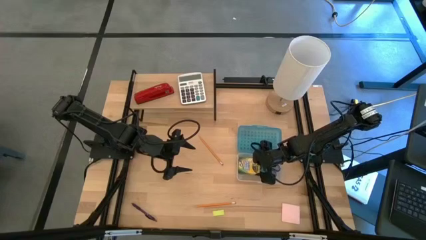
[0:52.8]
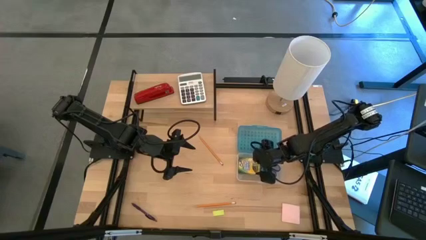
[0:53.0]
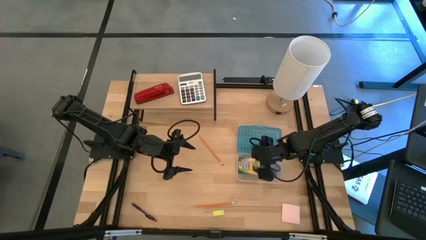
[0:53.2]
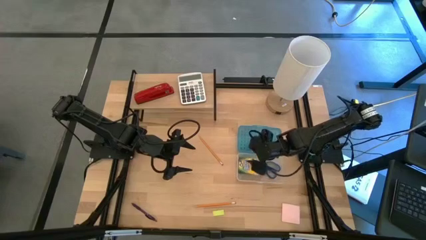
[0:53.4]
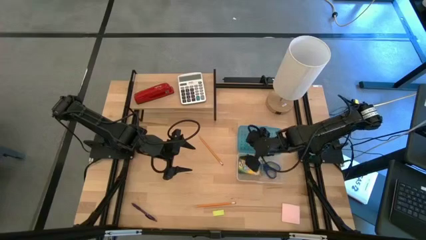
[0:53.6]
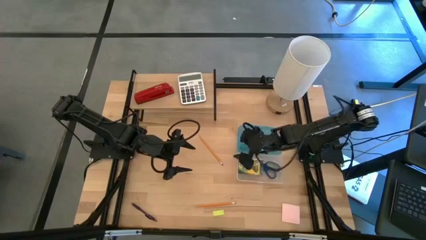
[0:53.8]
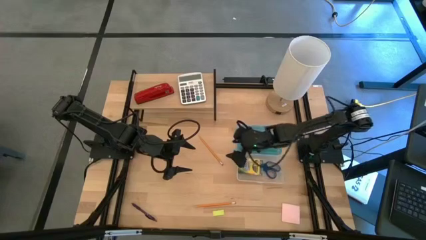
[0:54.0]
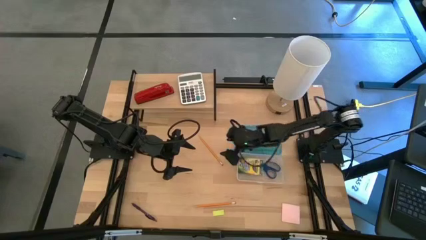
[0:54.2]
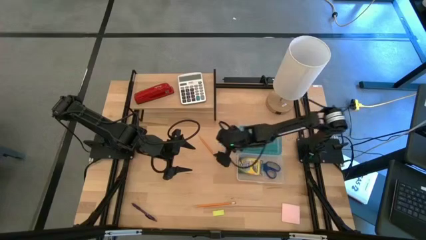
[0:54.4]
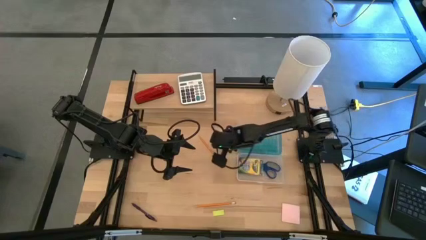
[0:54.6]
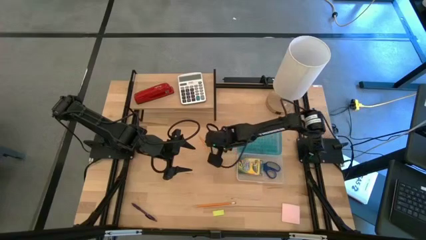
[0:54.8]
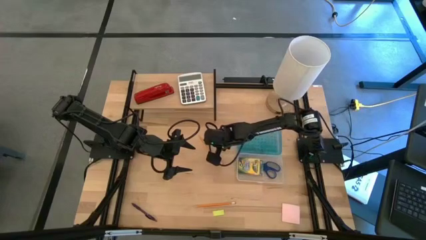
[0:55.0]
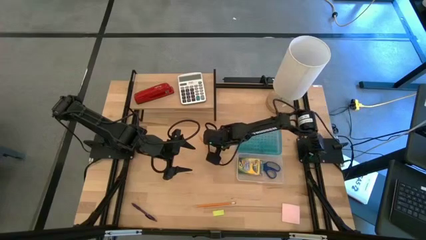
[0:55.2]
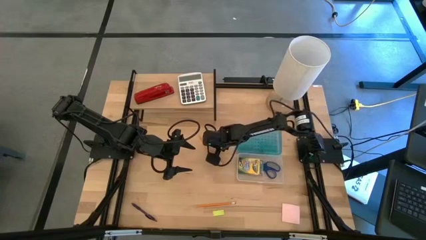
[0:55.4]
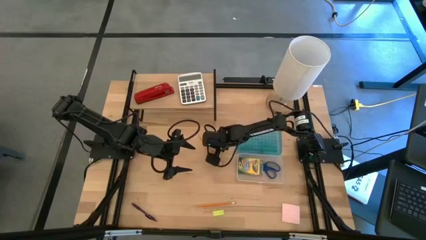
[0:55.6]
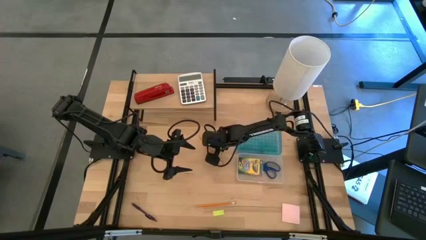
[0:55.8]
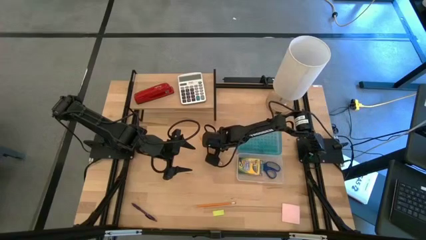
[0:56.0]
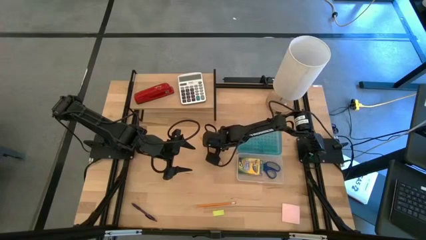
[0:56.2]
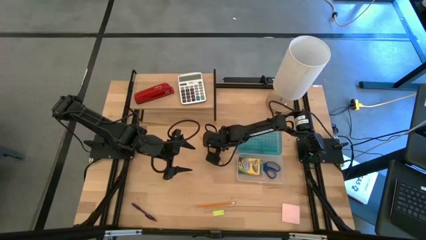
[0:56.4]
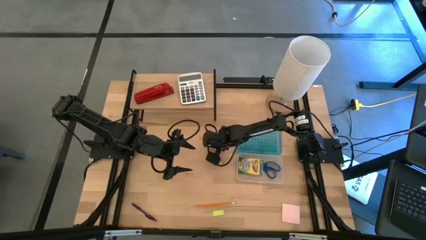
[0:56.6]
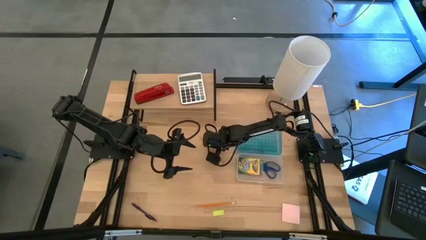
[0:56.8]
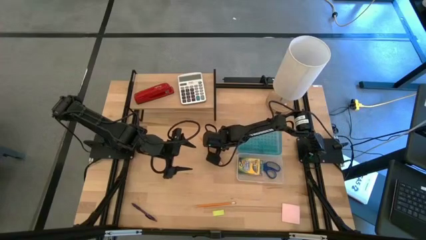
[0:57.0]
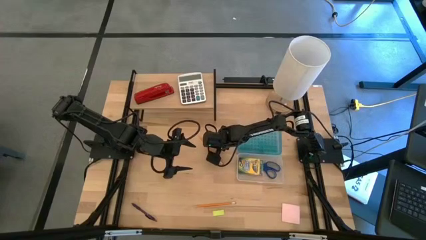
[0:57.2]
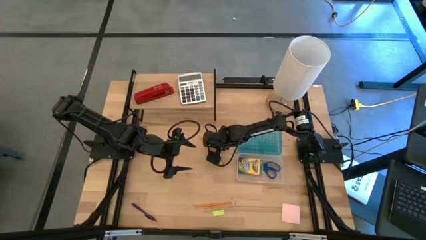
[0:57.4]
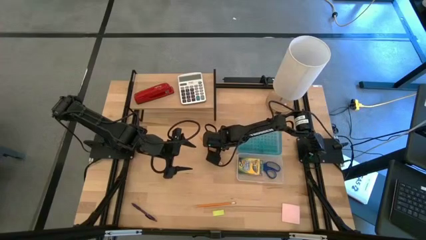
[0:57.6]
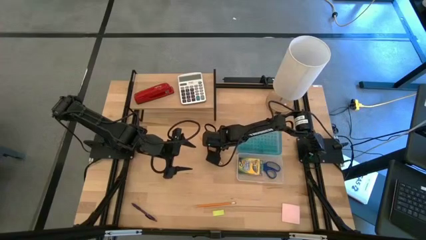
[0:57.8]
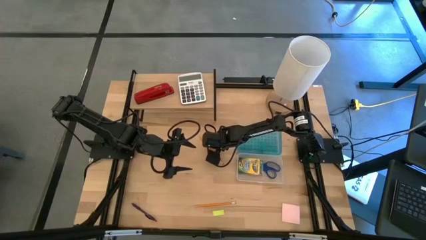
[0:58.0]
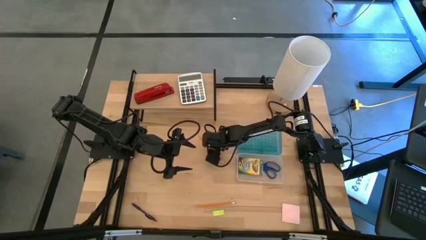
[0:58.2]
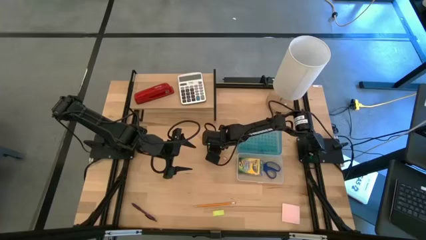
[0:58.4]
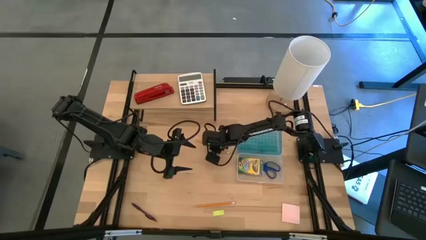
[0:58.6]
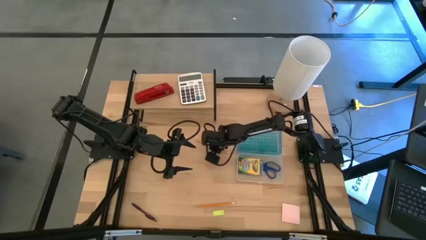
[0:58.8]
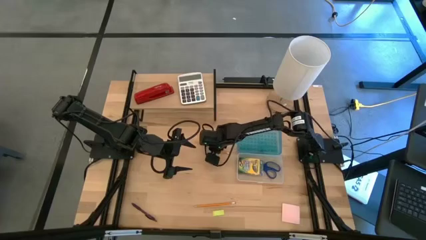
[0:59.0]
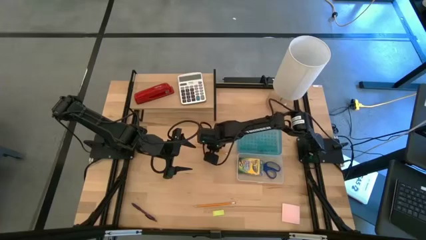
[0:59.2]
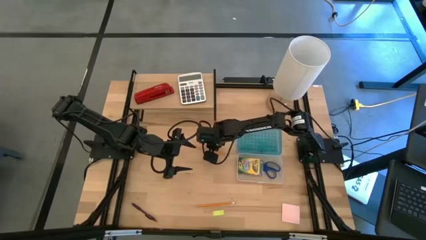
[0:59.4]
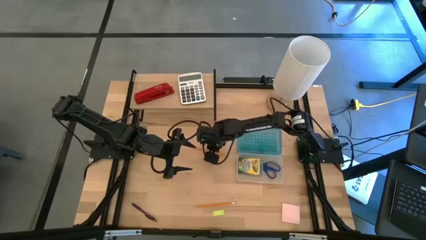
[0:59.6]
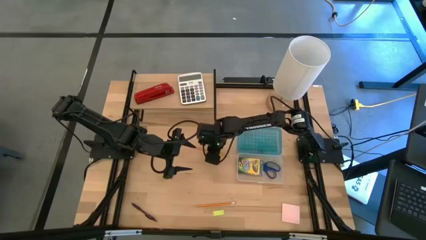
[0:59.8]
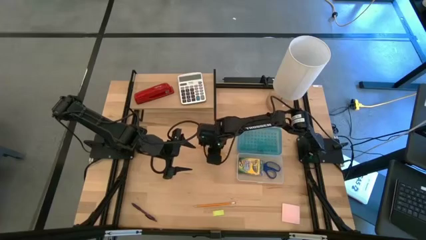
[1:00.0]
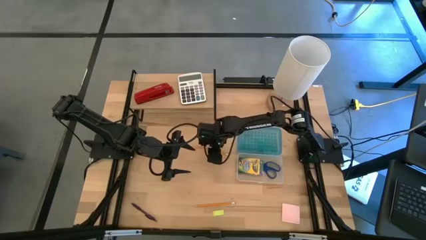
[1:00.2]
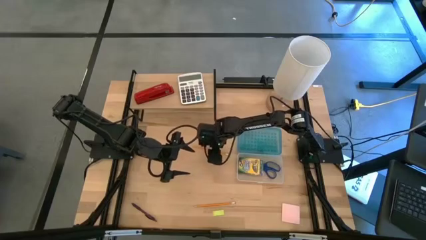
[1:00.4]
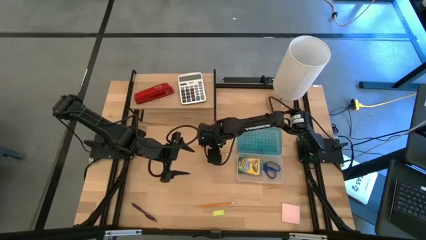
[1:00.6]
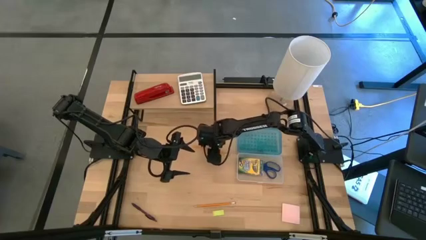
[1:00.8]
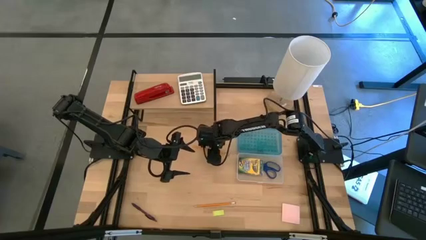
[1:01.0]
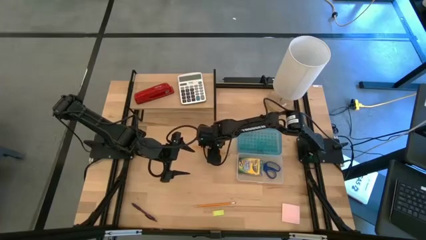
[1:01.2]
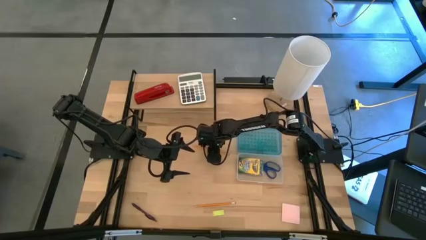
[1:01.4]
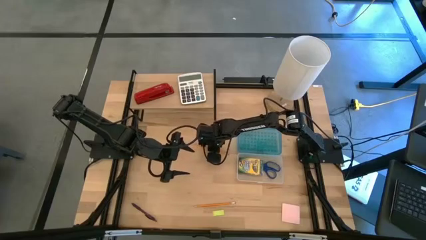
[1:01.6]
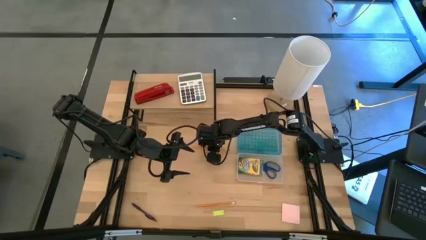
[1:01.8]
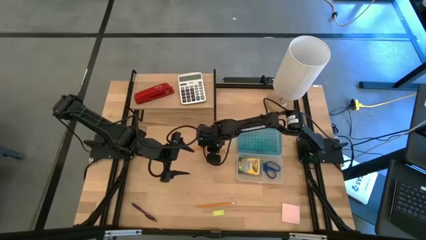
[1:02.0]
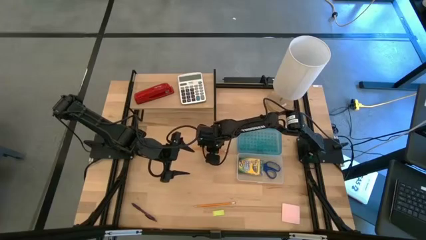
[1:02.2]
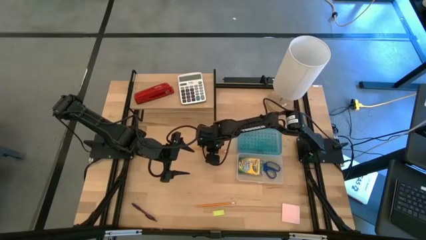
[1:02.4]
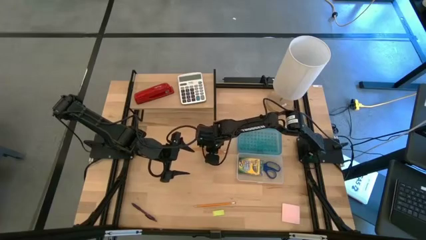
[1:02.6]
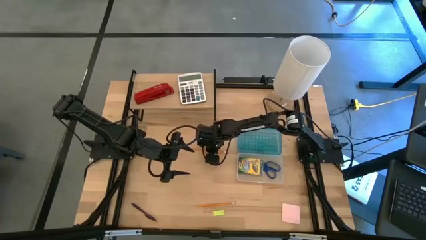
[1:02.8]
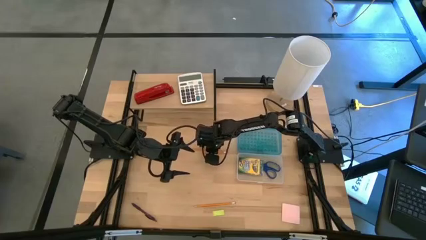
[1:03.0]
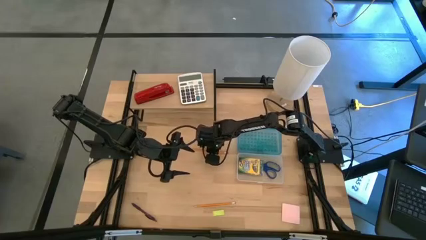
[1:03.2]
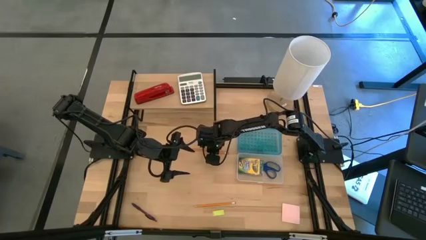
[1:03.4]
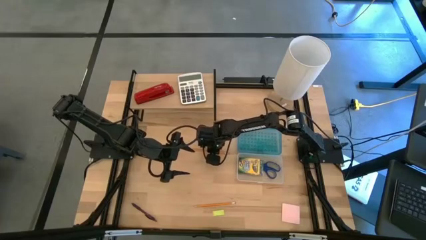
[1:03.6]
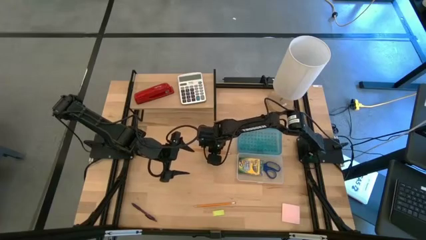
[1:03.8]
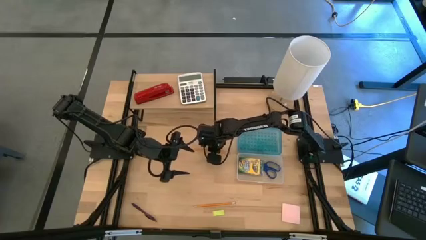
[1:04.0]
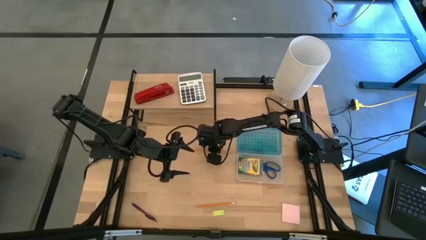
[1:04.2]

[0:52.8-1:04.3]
Task: Pack school essentials
Put the top orange pencil into the blue supply box

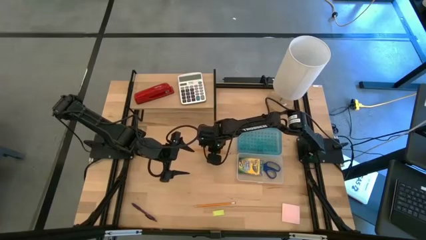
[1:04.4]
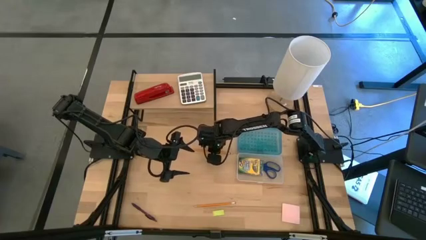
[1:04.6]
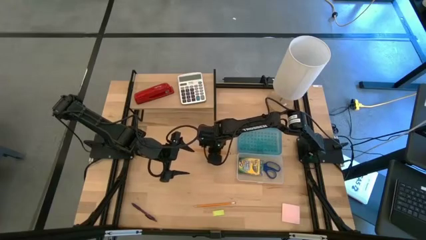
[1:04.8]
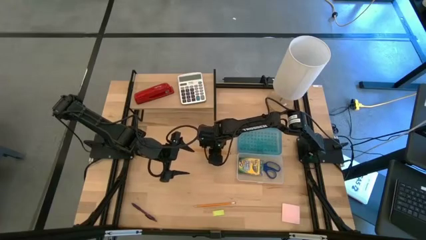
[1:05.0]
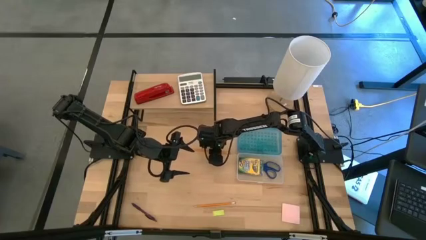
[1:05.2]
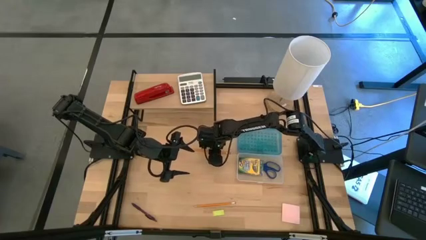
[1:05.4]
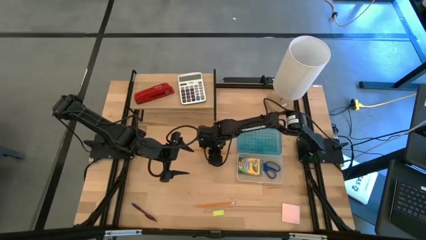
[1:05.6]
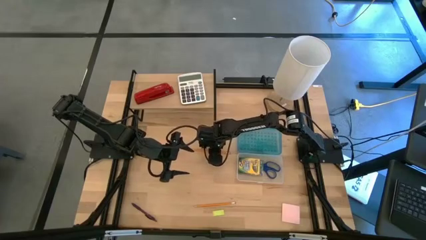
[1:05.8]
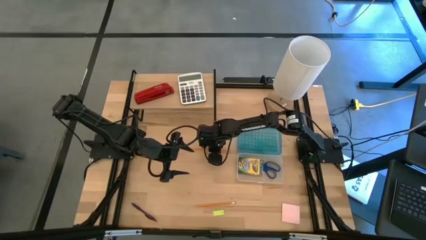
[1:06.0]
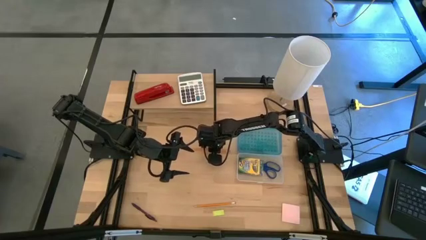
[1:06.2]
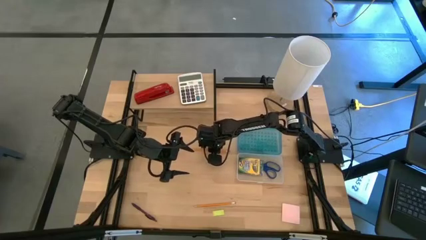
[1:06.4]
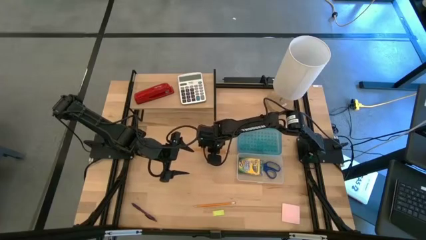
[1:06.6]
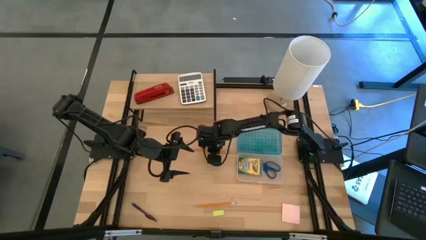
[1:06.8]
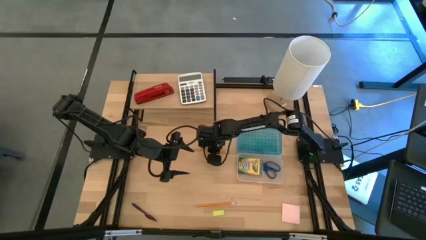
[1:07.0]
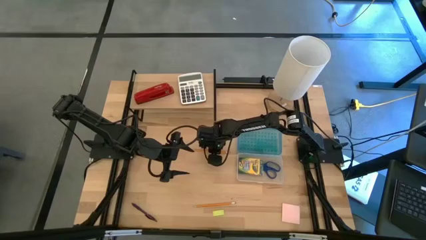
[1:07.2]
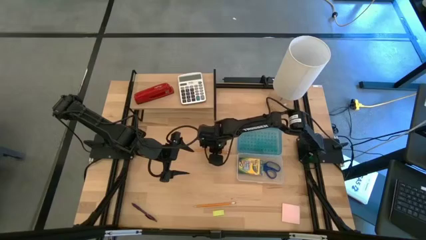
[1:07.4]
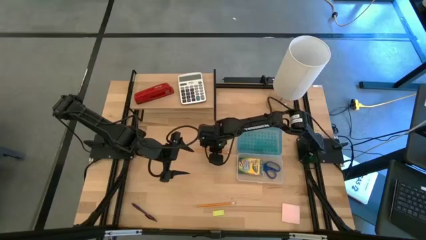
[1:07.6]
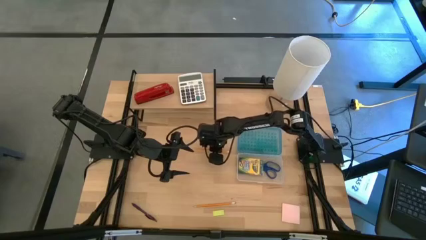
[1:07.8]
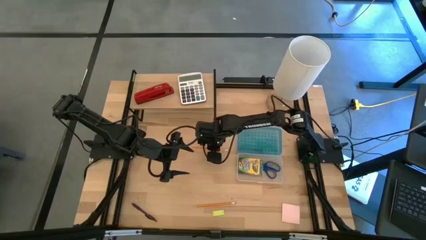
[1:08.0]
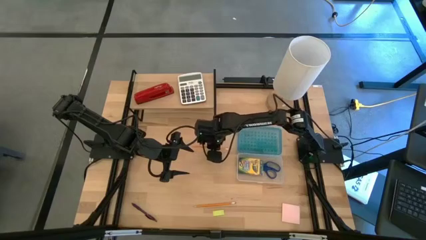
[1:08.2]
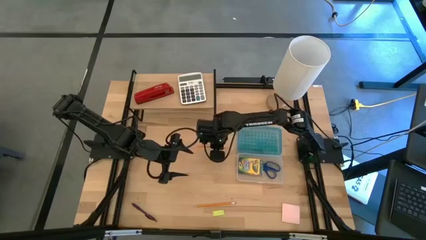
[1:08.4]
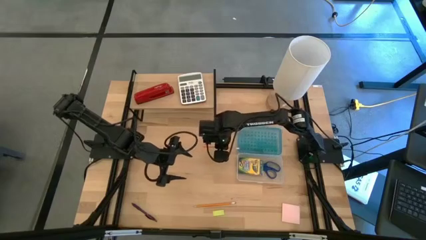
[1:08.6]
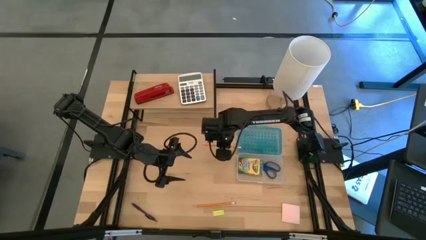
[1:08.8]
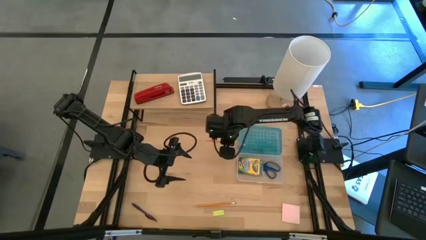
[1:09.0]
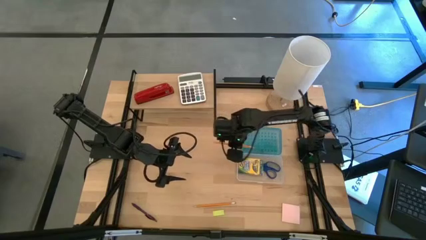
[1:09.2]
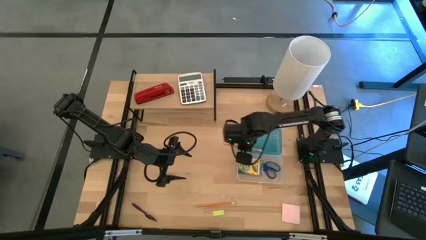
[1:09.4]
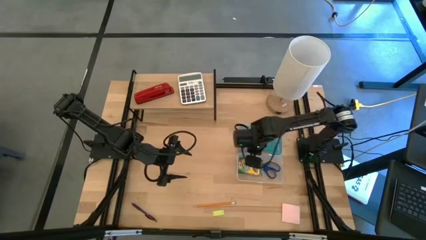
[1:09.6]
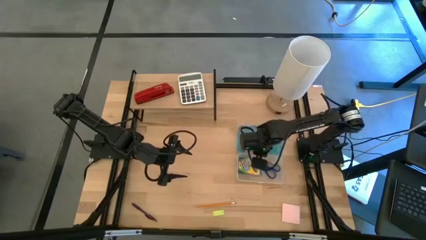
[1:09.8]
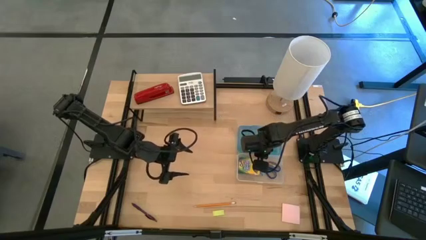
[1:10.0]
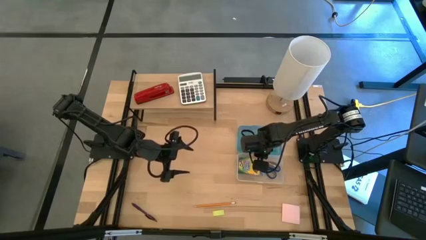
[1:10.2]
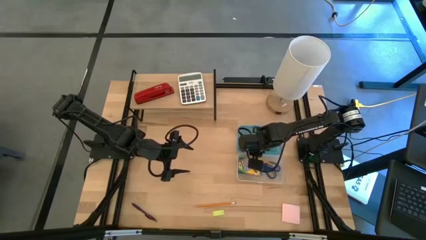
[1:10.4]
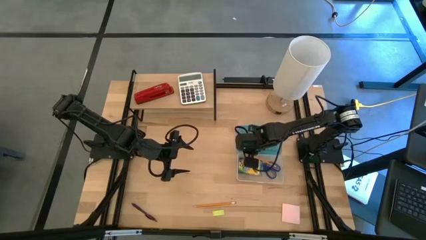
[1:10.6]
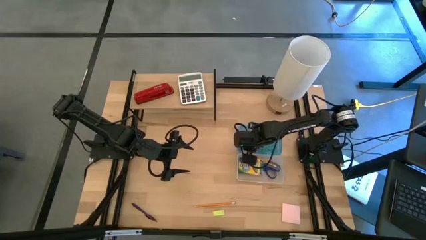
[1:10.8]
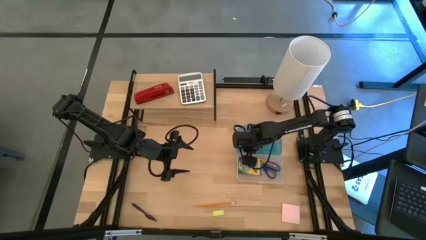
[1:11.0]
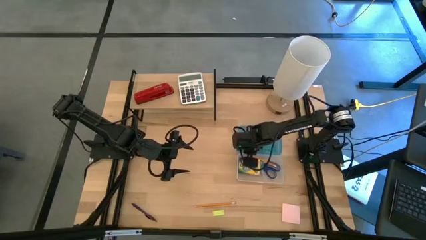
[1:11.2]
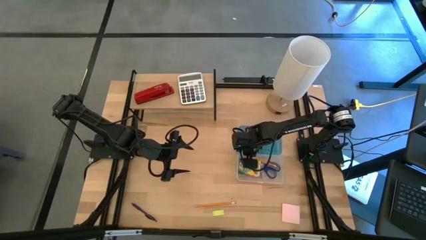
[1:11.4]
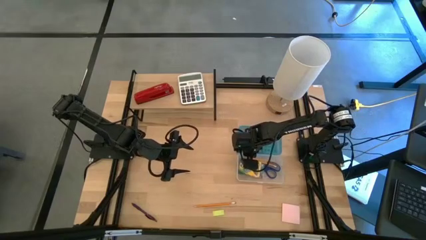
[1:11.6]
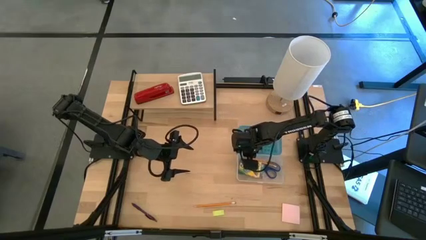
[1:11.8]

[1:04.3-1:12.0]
Put the top orange pencil into the blue supply box
